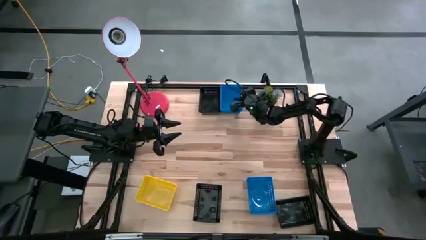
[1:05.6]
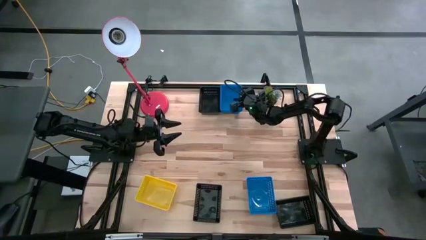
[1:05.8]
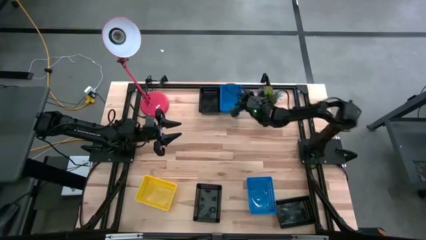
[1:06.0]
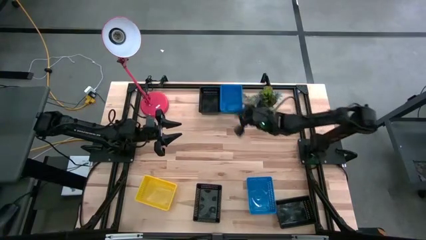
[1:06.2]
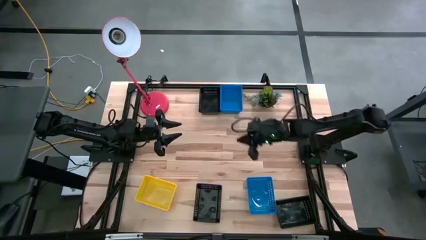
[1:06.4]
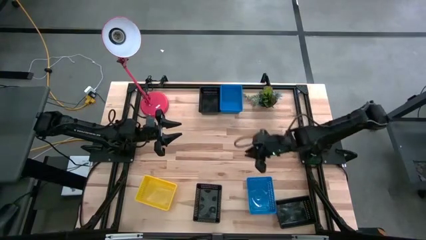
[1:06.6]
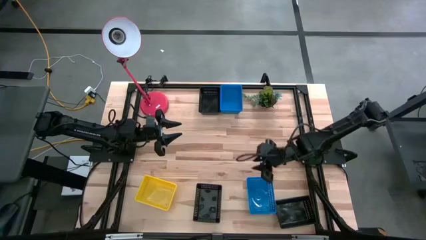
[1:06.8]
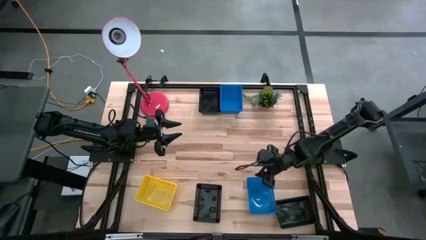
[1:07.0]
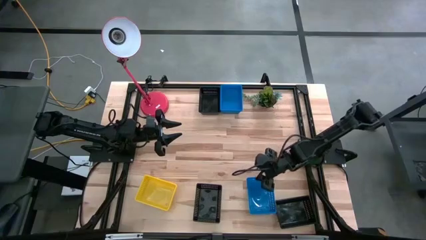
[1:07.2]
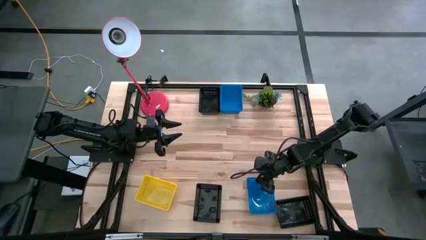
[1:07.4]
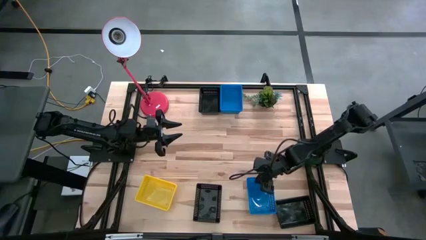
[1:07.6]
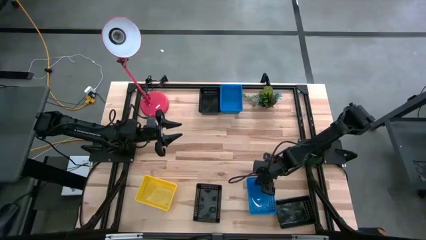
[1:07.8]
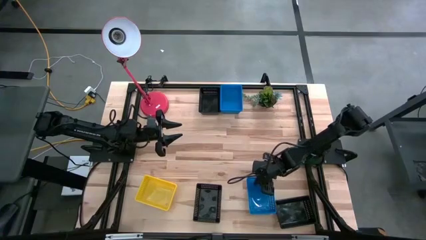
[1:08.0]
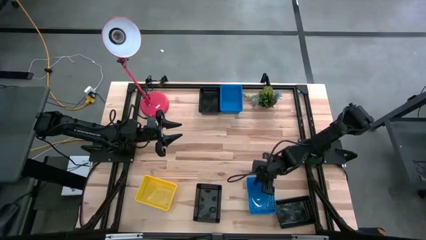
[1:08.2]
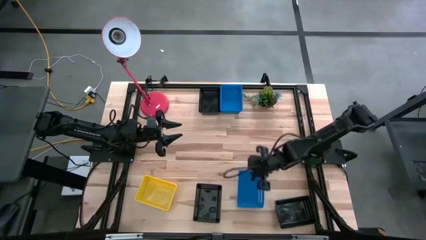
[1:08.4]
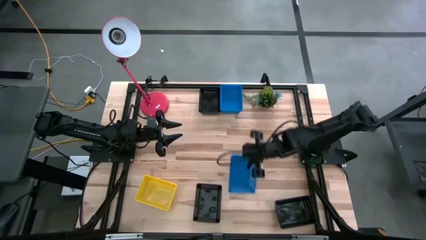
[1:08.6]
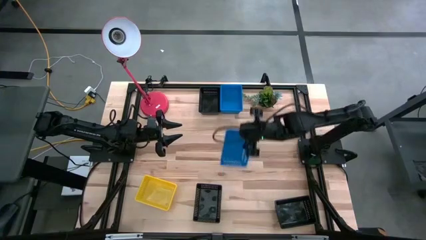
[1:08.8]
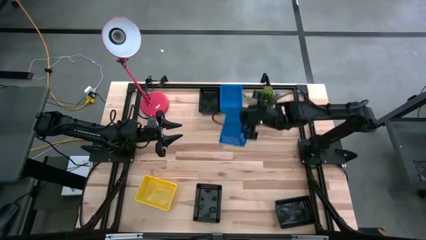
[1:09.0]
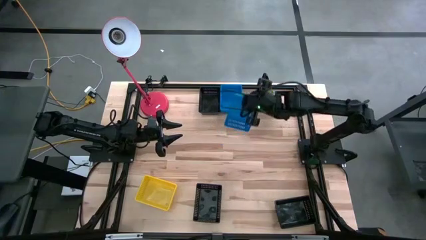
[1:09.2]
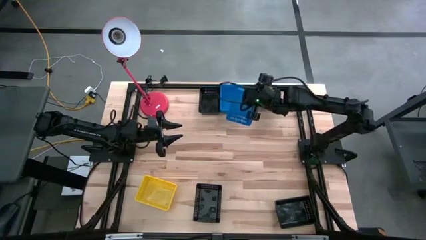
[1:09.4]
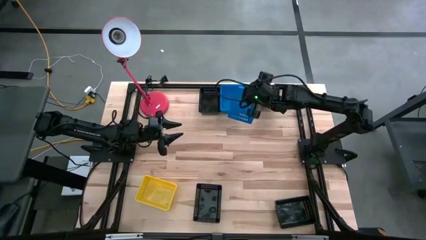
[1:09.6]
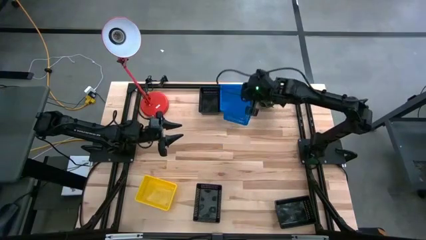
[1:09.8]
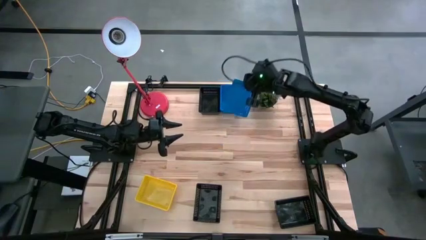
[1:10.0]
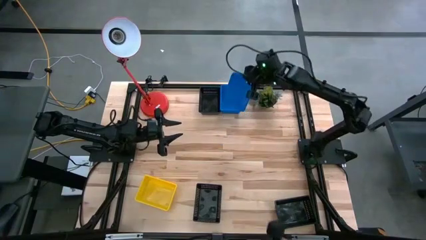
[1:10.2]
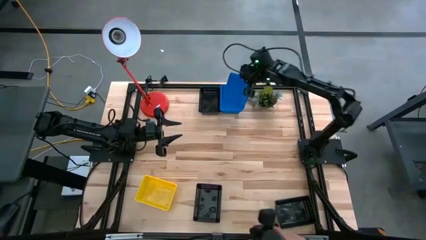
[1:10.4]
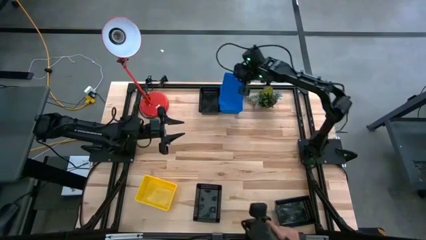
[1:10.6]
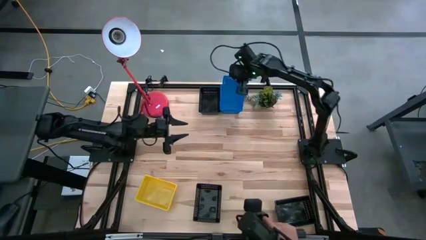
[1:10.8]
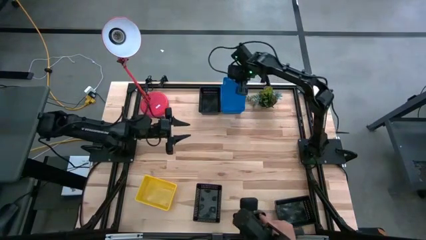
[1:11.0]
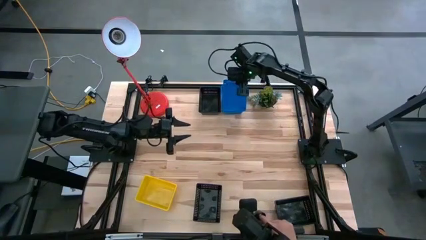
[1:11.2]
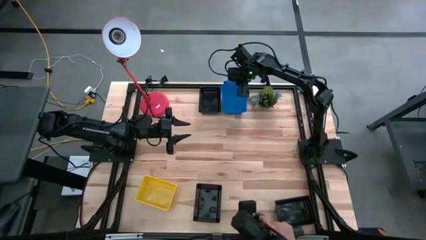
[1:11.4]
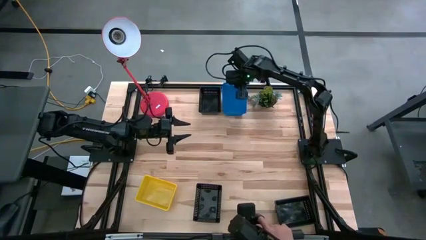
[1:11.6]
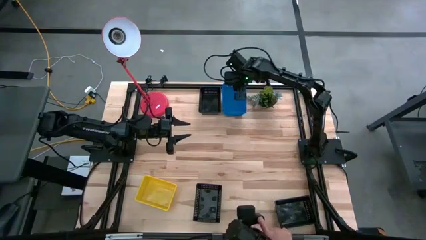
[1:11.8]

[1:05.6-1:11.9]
Stack the bottom blue bin on the top stacked blue bins

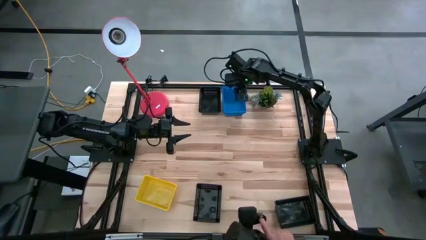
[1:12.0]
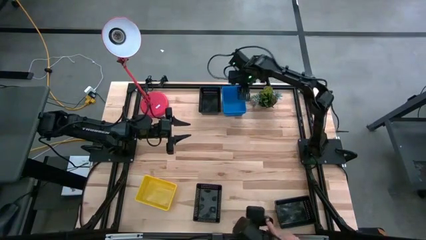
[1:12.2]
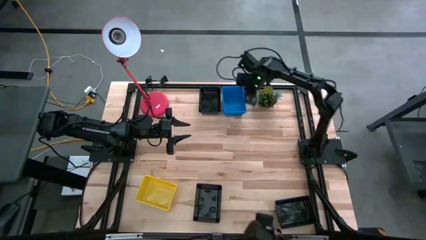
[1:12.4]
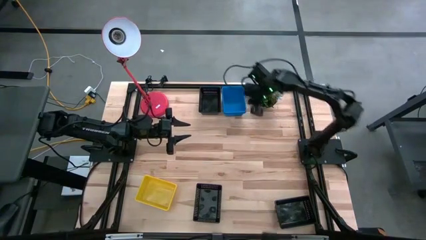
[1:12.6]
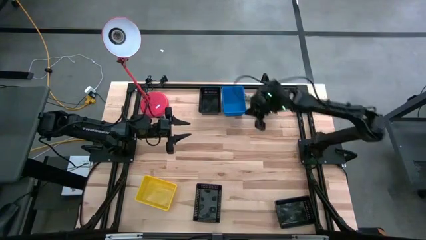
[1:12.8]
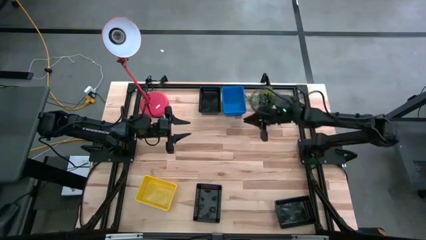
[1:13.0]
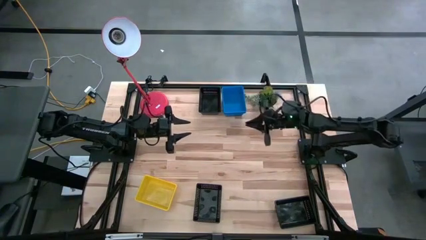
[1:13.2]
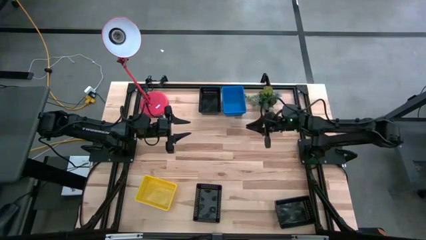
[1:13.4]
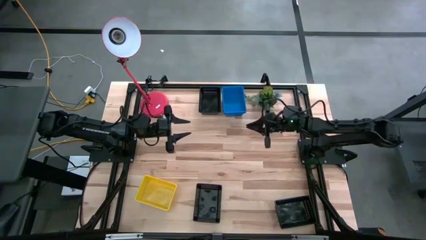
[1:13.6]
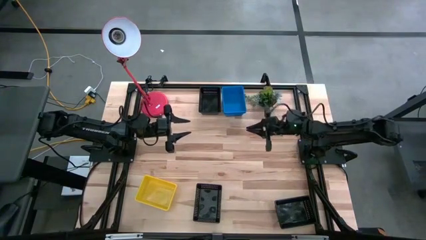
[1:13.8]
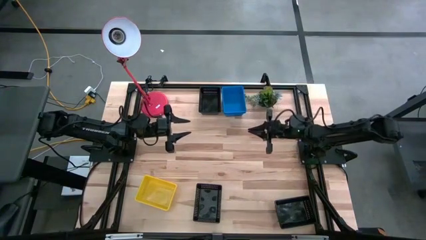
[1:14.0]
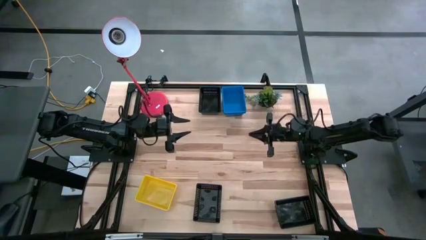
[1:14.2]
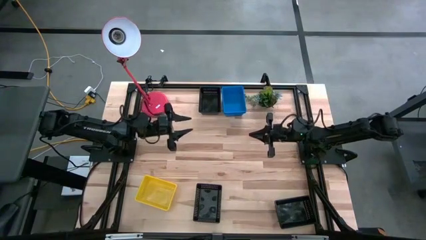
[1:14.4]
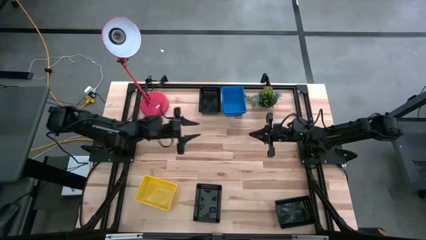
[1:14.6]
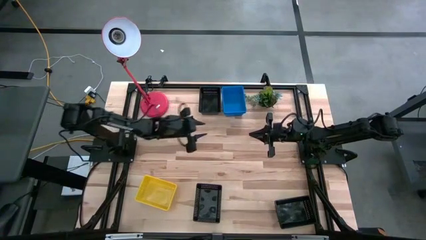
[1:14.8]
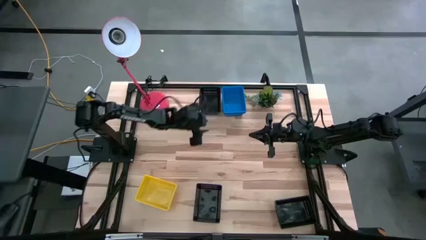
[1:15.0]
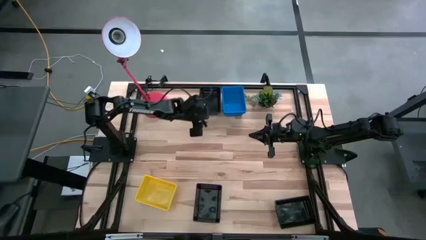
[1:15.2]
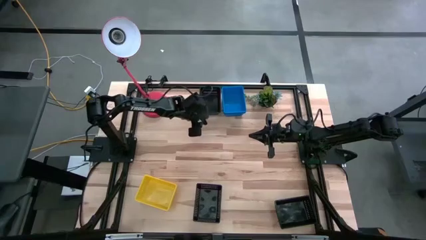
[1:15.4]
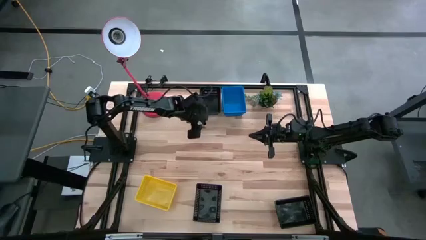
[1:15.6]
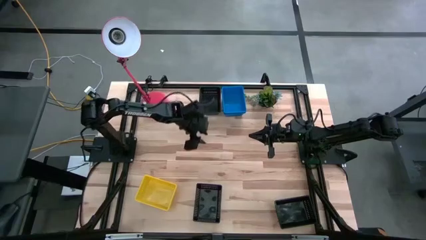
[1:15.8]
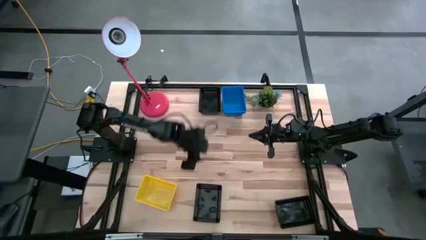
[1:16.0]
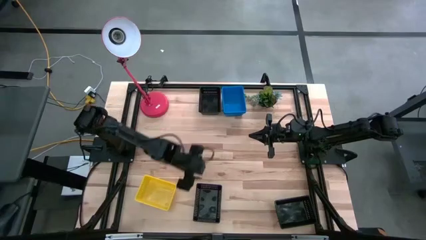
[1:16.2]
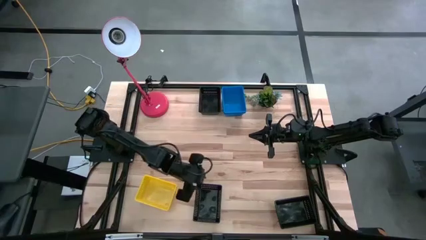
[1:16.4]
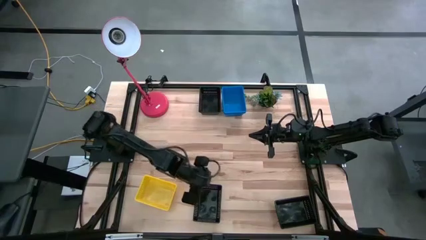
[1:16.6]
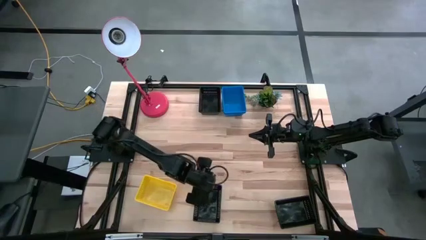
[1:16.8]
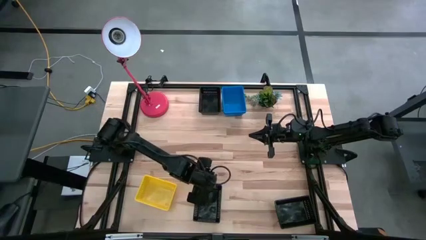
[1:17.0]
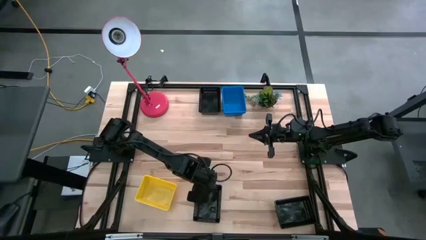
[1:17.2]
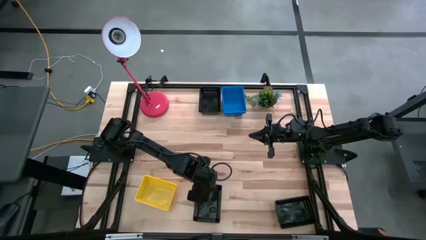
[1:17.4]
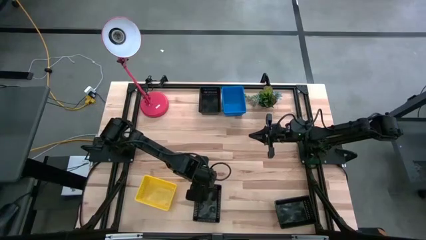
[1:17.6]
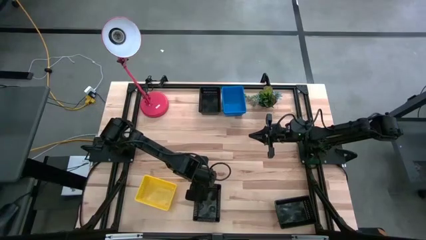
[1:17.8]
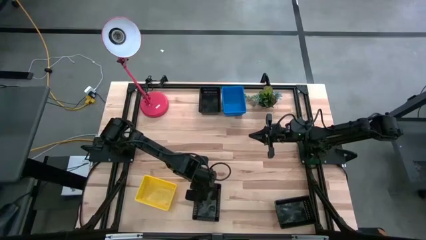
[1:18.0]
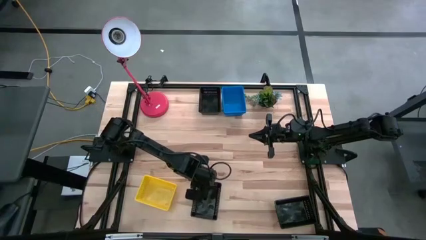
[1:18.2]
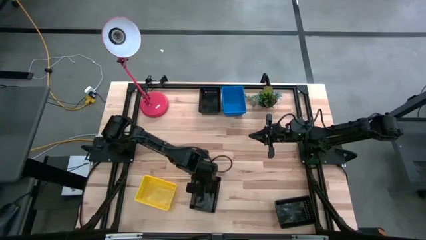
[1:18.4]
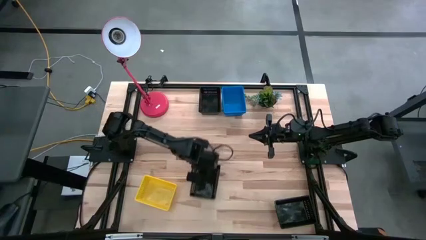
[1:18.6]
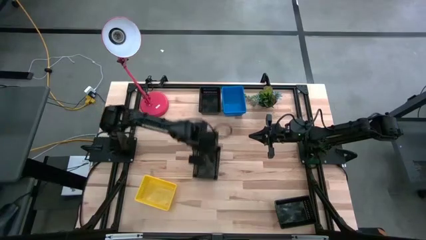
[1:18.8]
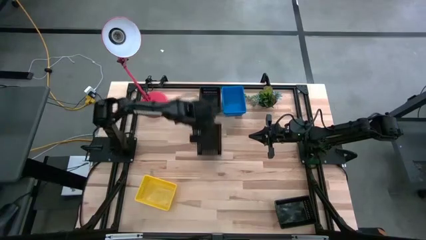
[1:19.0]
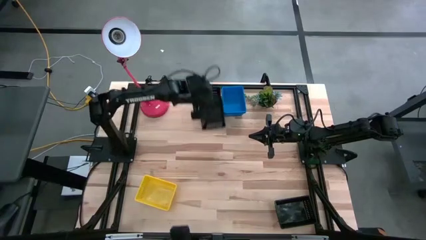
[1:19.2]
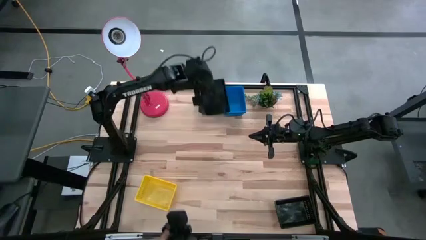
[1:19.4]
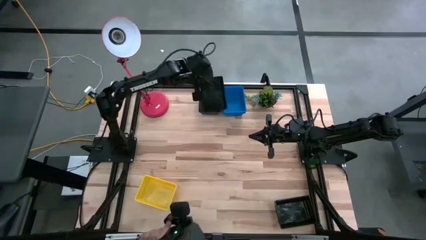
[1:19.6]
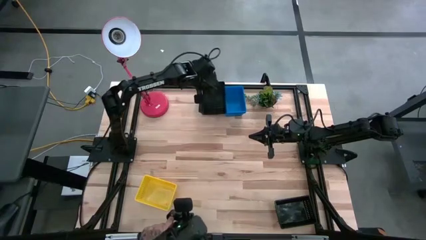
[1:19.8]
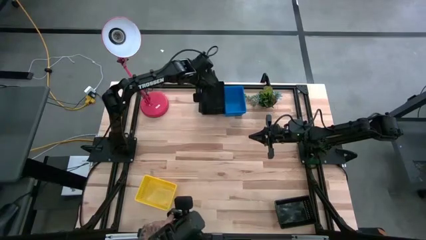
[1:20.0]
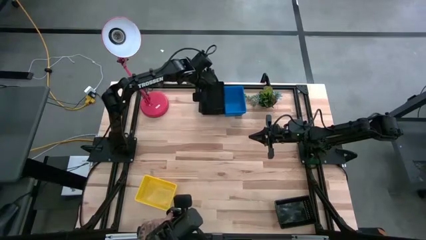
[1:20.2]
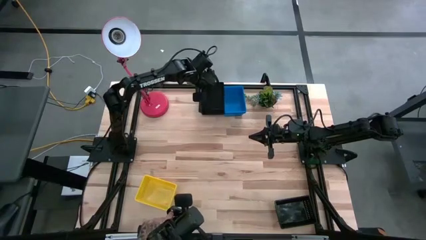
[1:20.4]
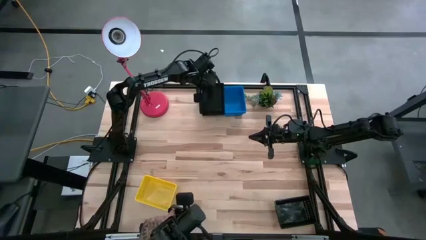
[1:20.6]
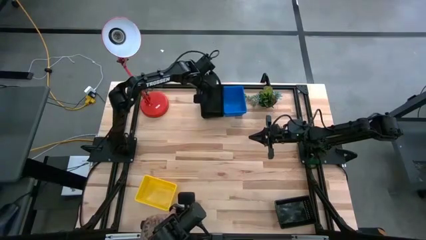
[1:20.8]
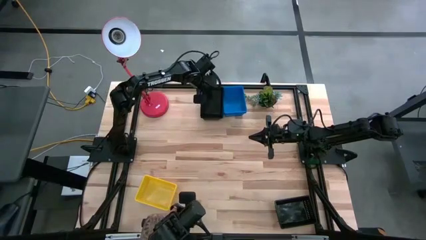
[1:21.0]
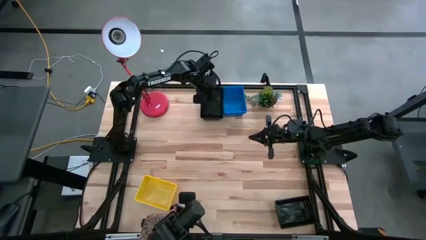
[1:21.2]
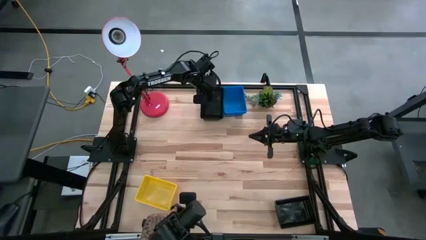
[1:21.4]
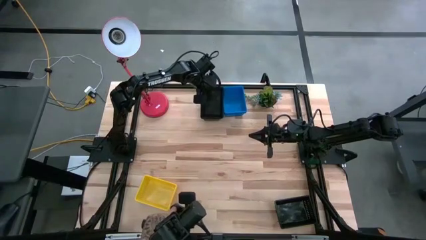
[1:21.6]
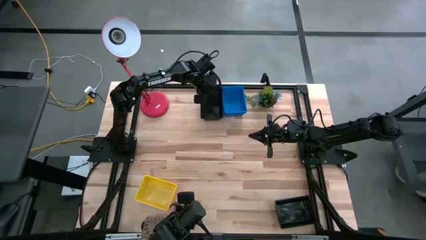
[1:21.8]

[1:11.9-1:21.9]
Stack the bottom left black bin on the top black bin
